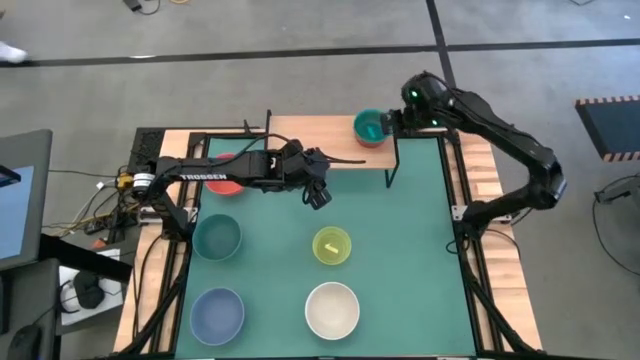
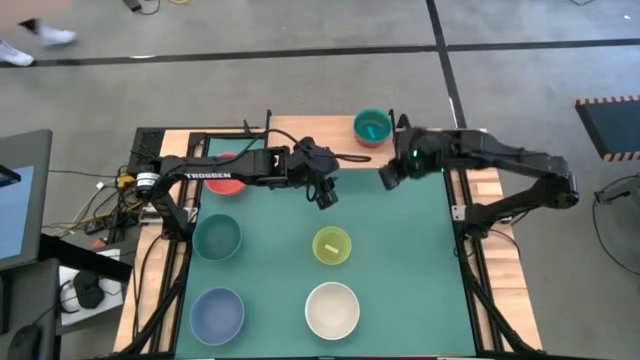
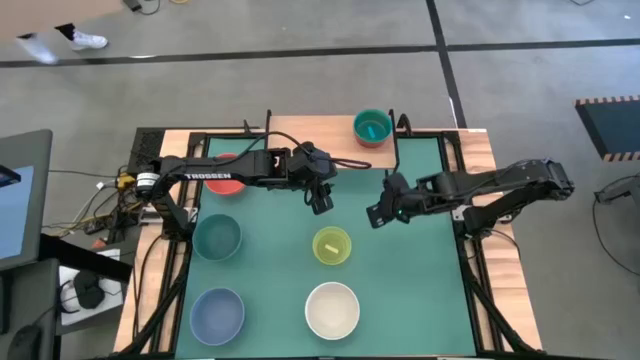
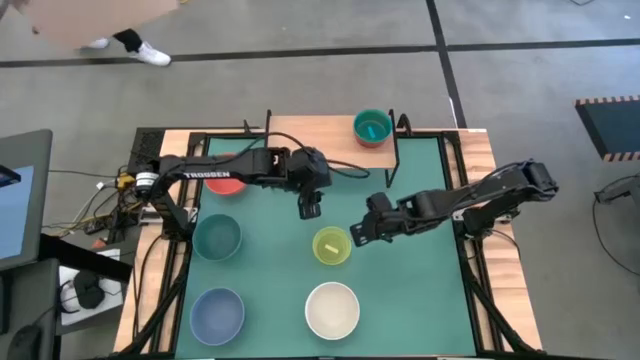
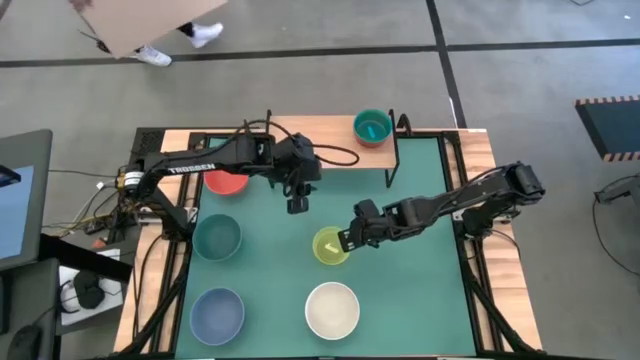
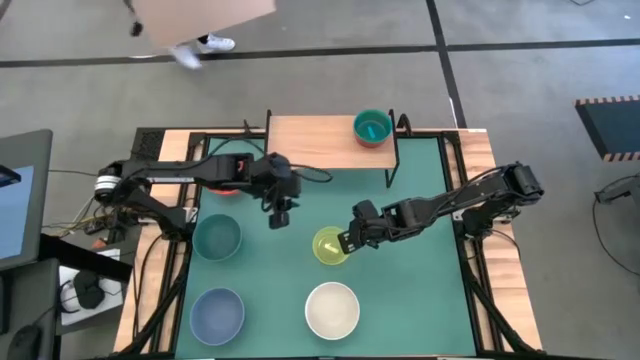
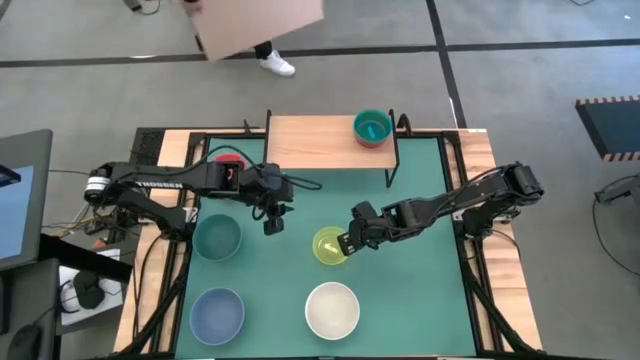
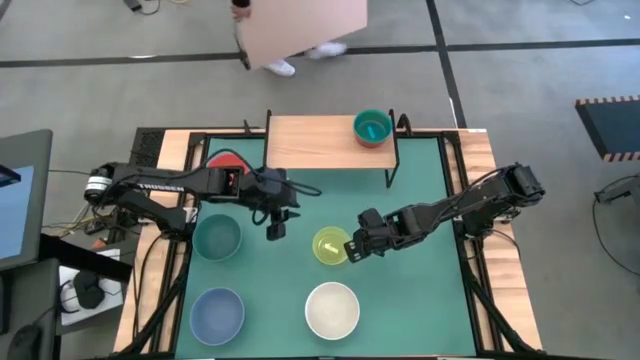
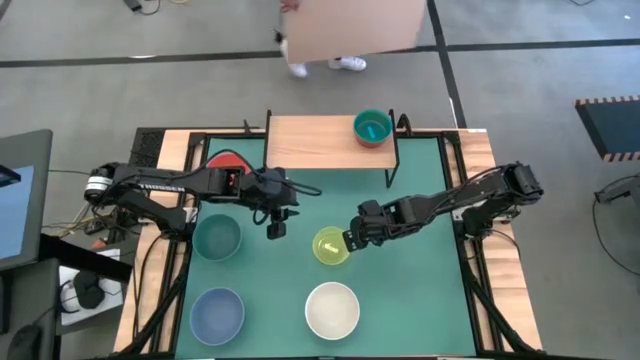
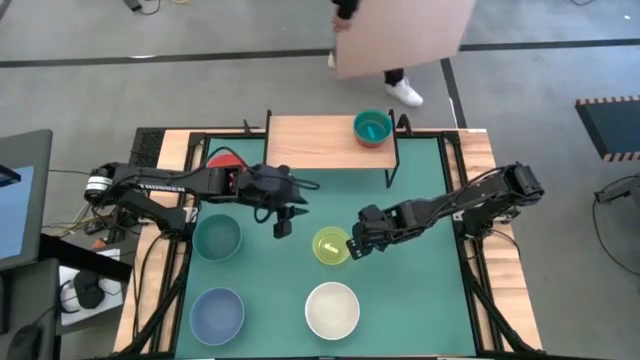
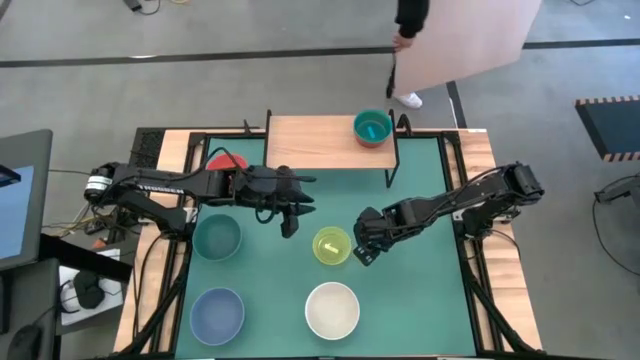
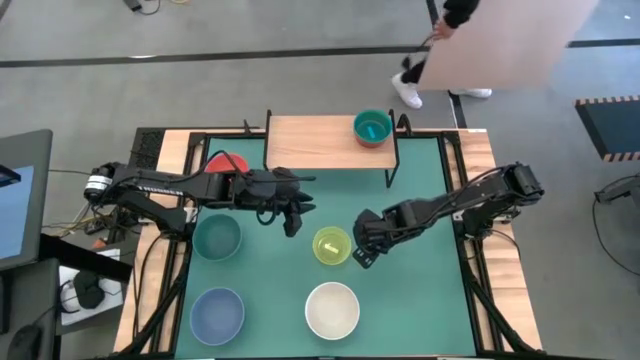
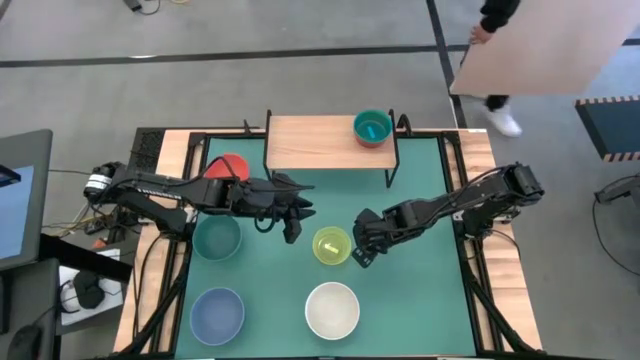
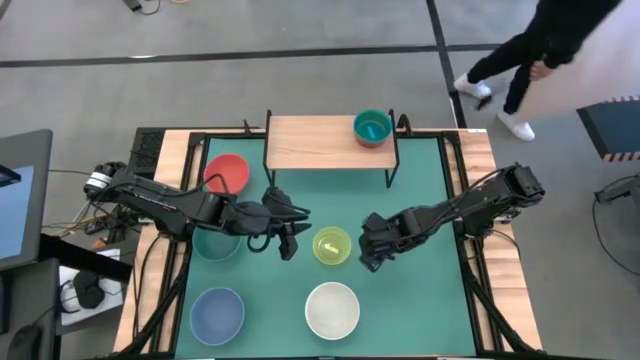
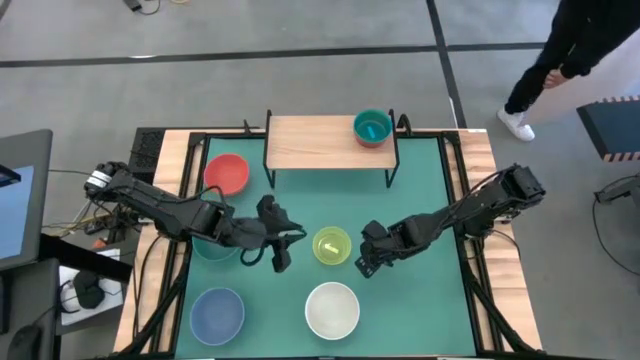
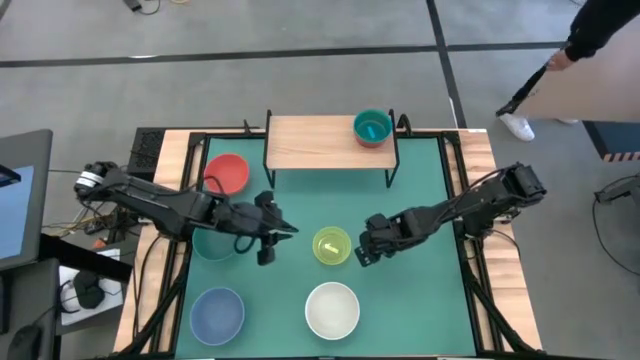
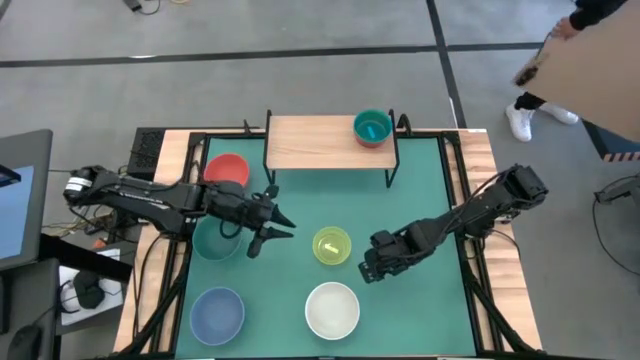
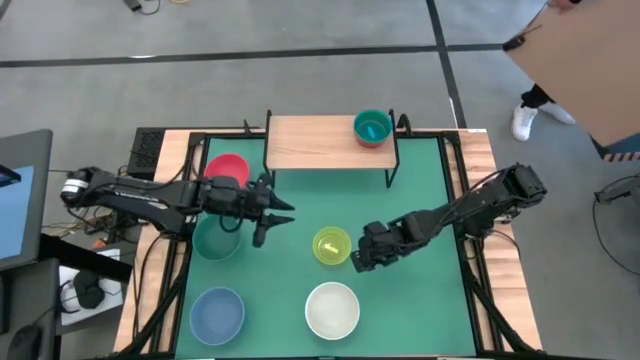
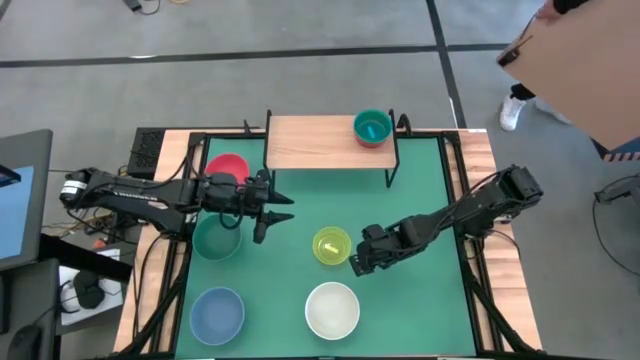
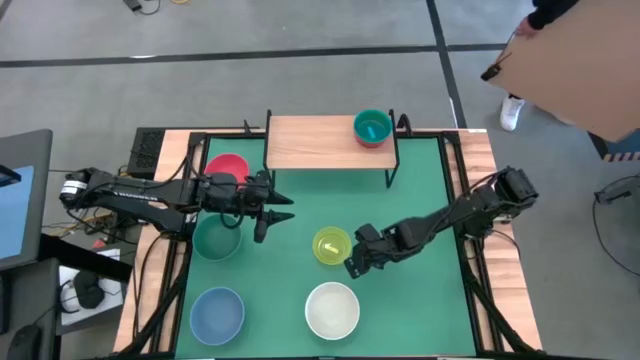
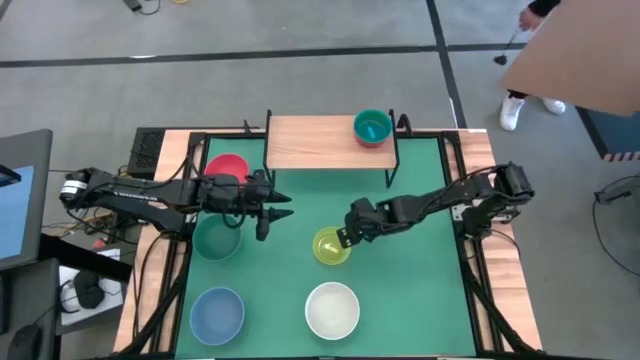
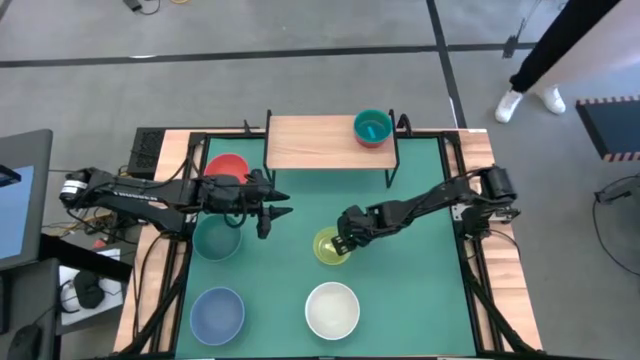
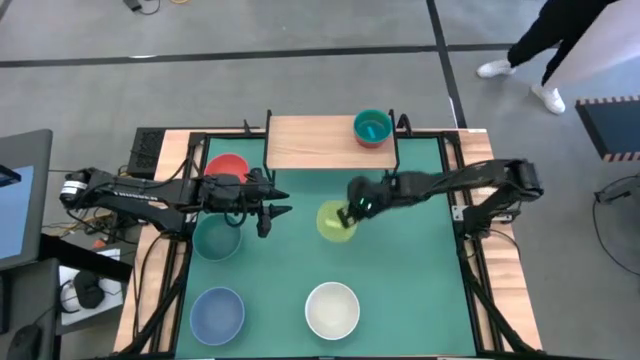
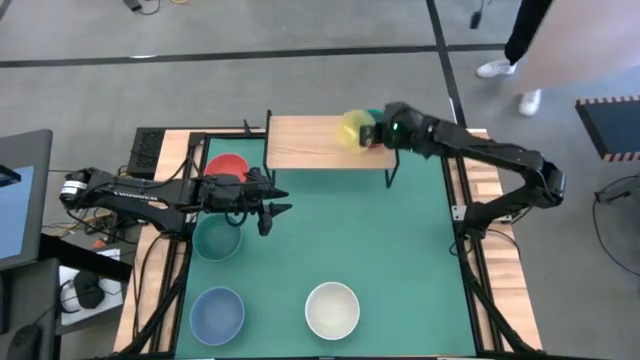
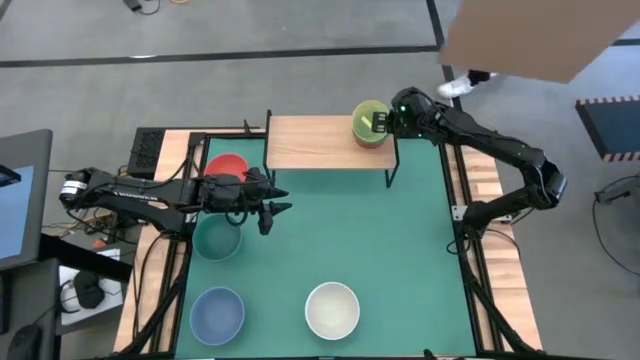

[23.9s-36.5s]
Task: Place and stack bowls onto a shelf
Stack the small light green bowl on top of the small blue bowl on the shelf

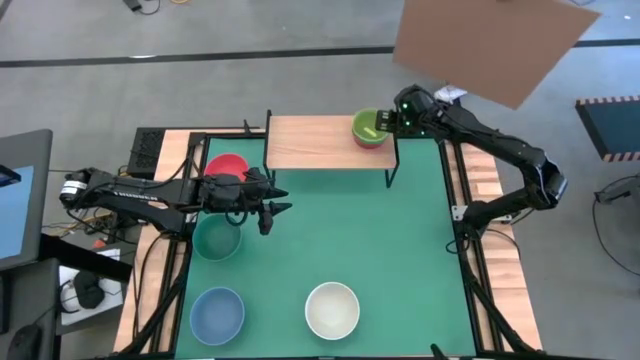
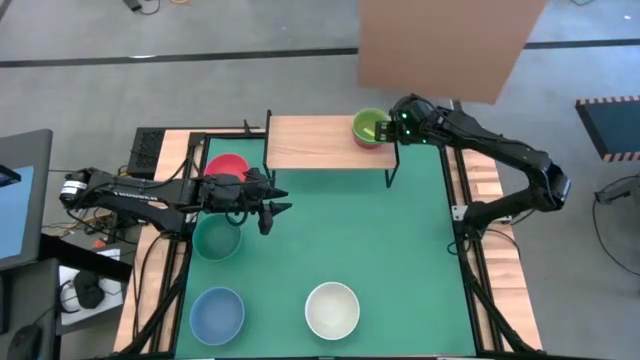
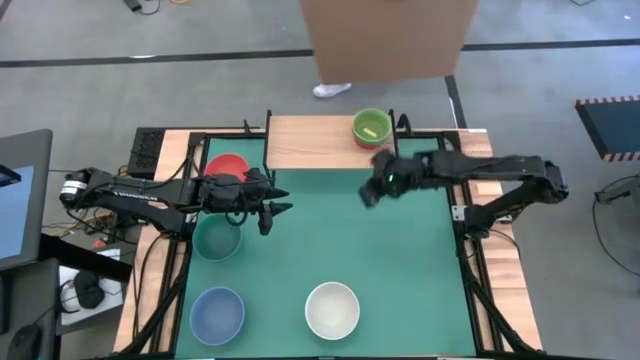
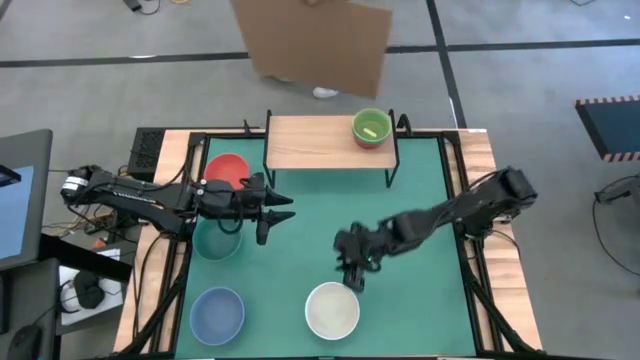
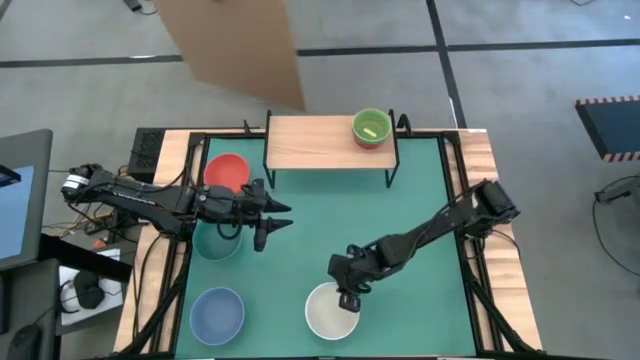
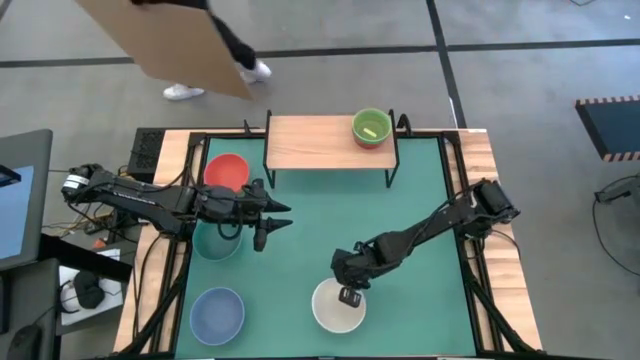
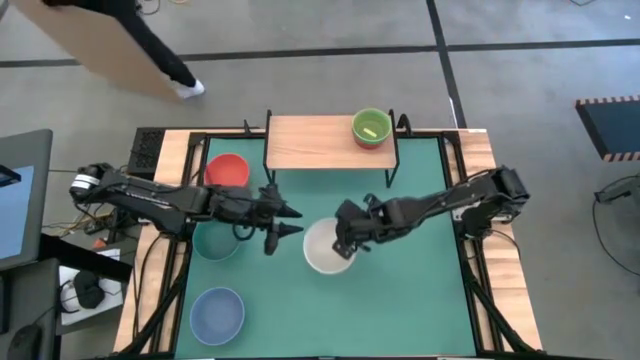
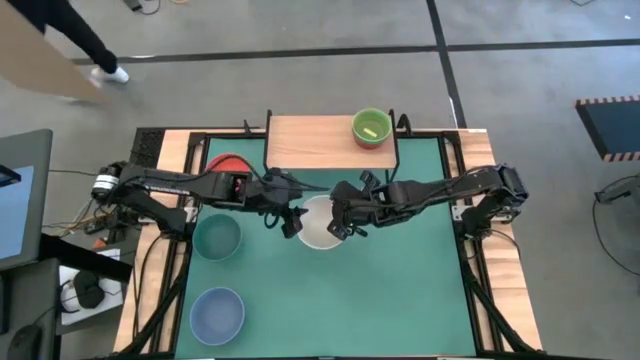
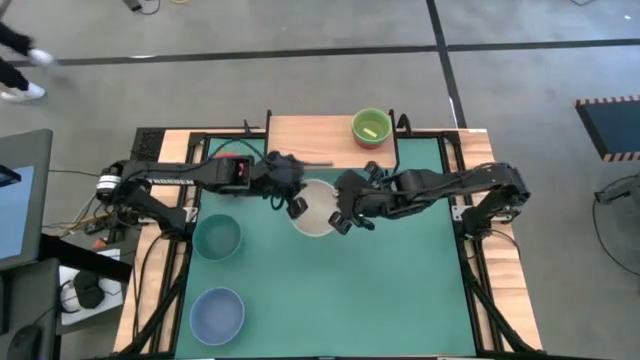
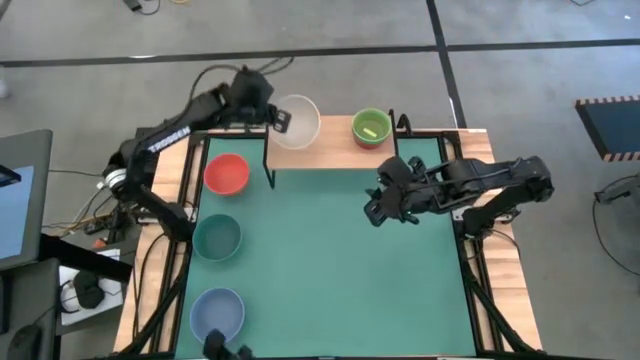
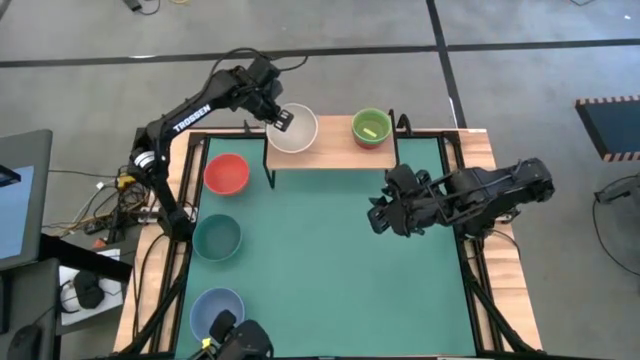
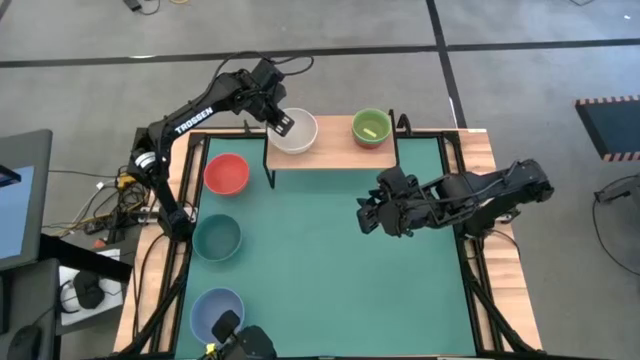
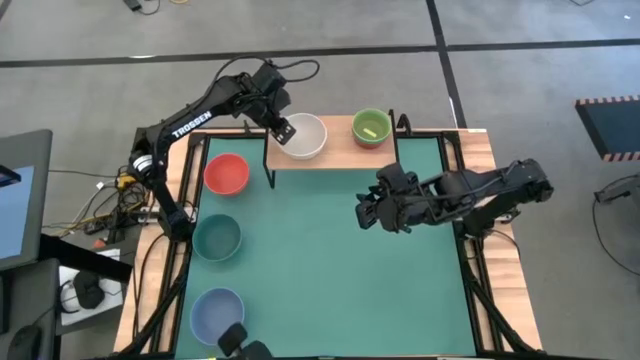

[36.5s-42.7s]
Put the large white bowl on the shelf

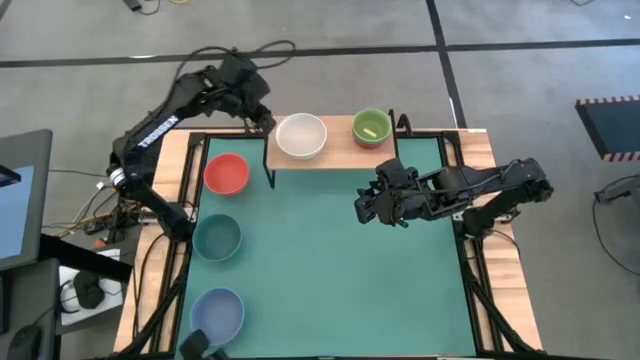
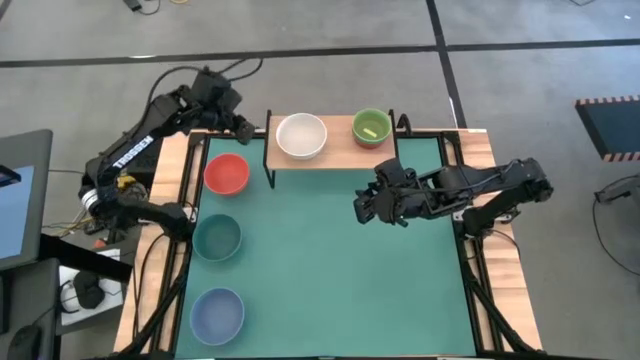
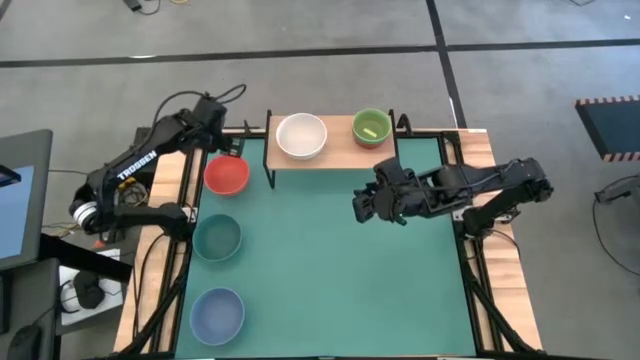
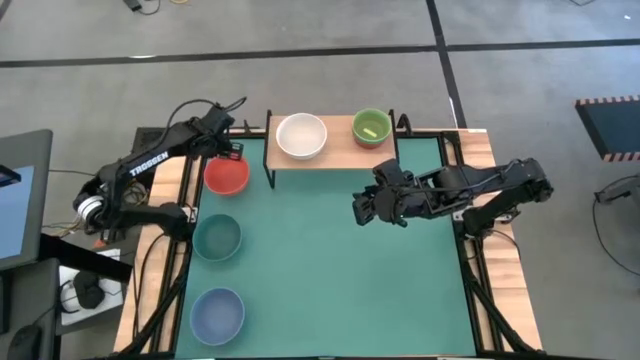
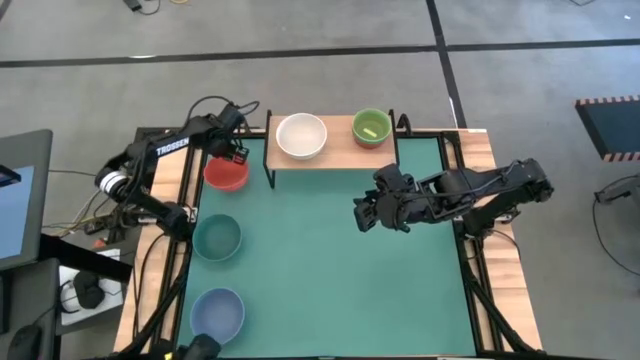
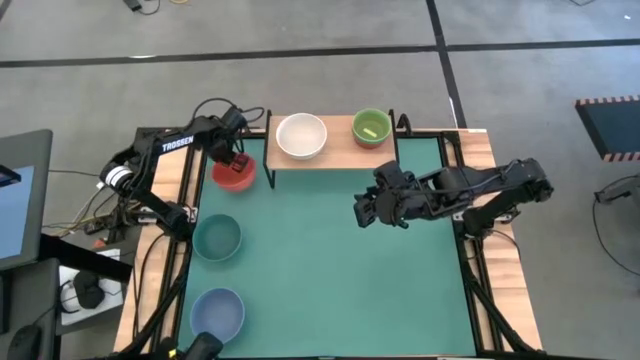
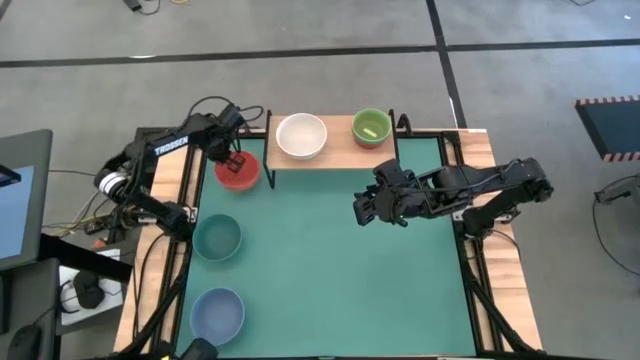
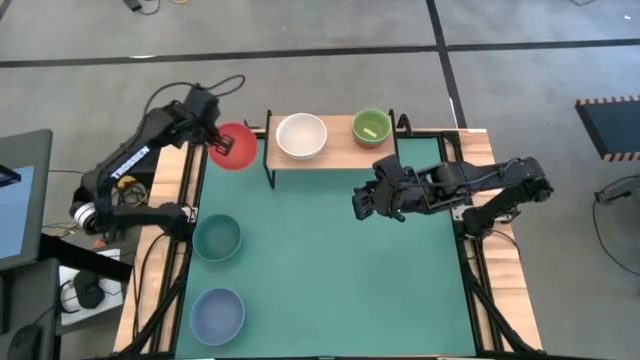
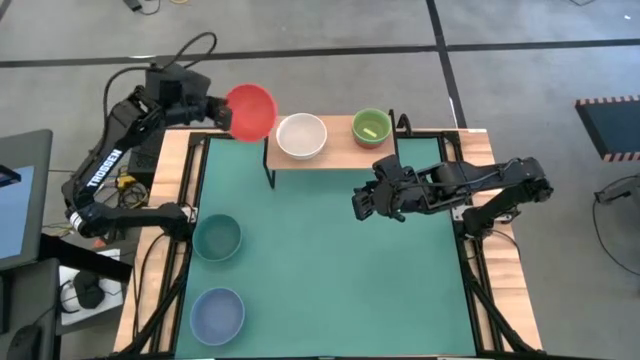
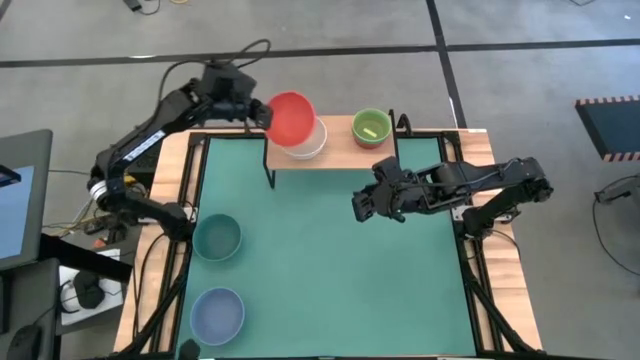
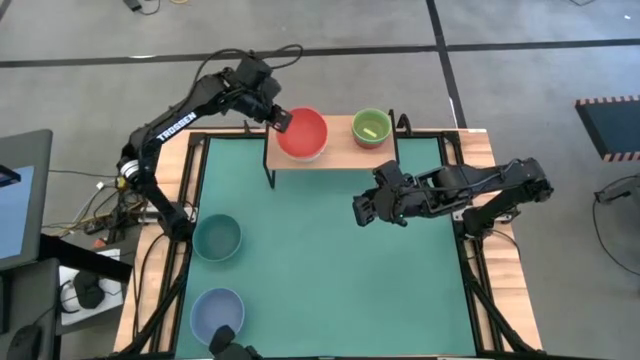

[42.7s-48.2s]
Stack the large orange bowl on top of the large white bowl on the shelf
